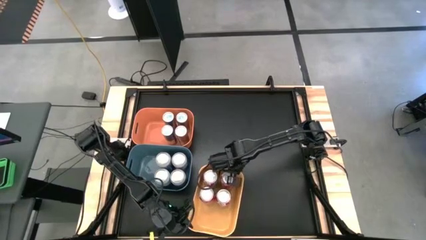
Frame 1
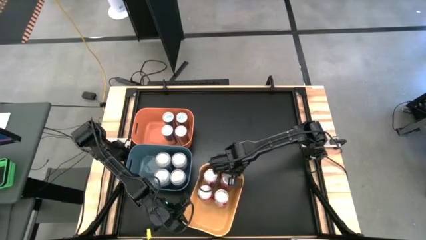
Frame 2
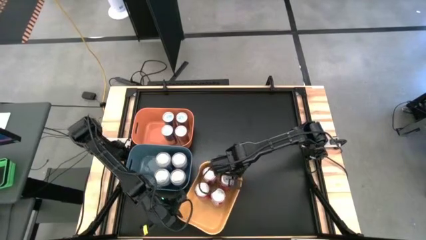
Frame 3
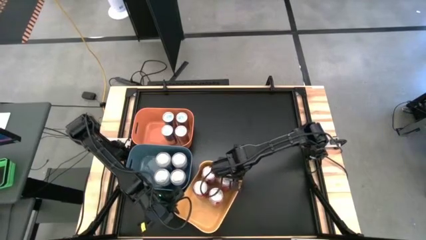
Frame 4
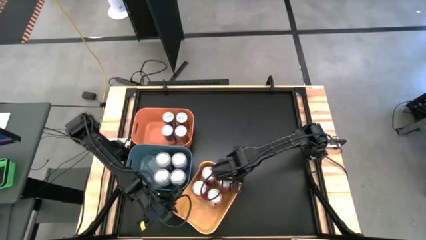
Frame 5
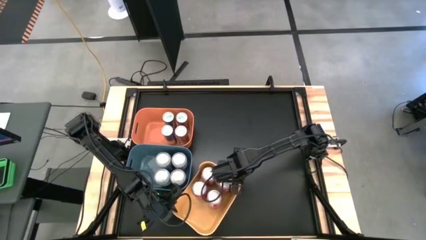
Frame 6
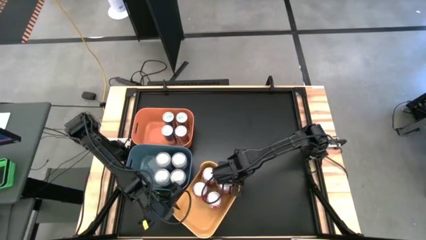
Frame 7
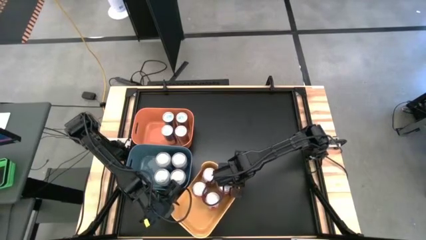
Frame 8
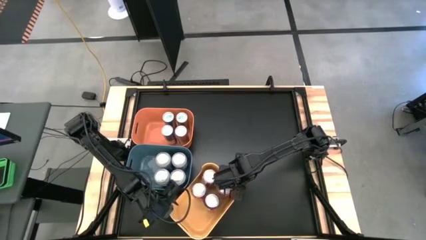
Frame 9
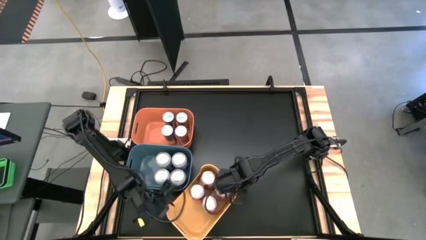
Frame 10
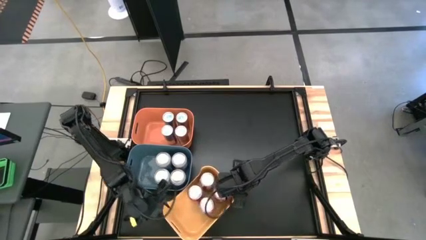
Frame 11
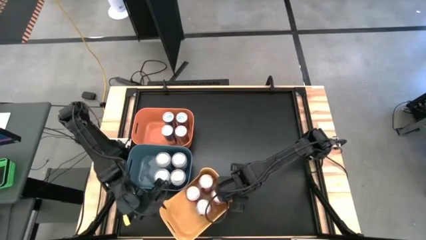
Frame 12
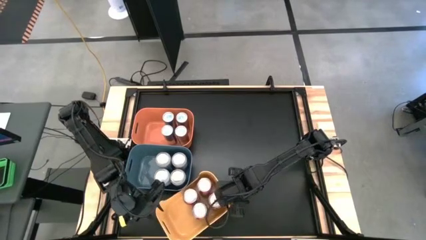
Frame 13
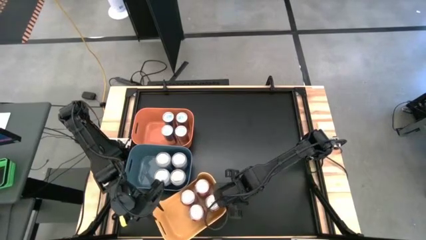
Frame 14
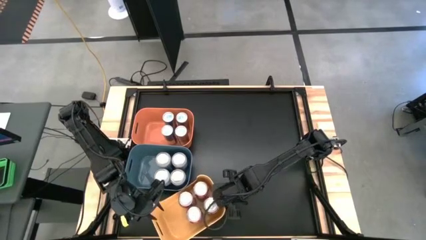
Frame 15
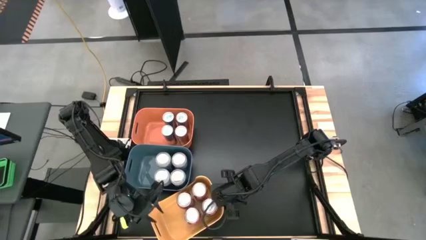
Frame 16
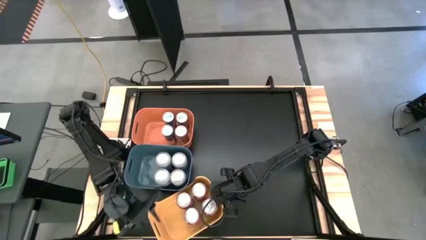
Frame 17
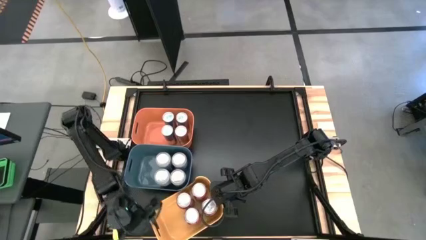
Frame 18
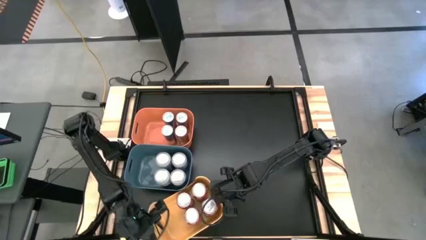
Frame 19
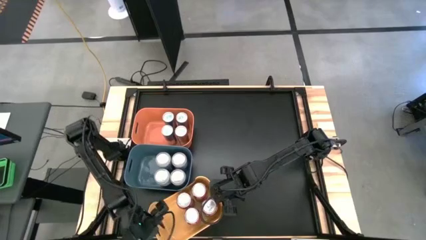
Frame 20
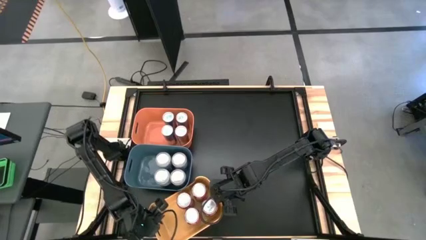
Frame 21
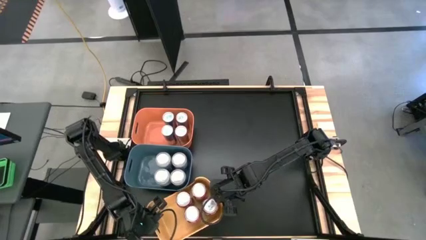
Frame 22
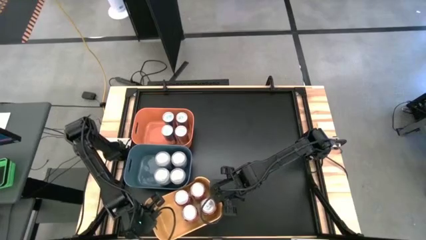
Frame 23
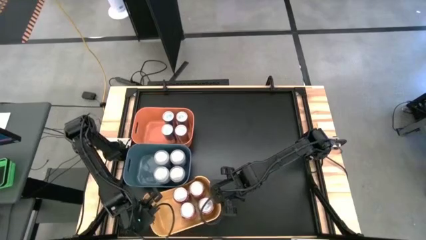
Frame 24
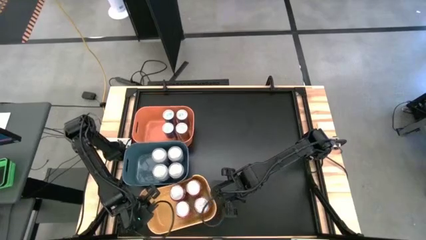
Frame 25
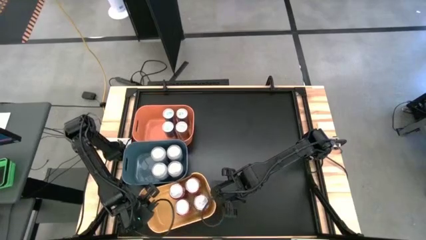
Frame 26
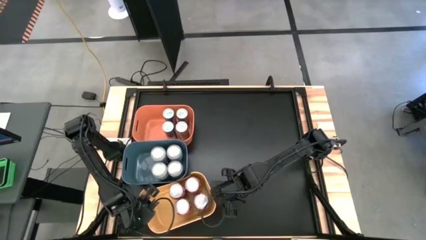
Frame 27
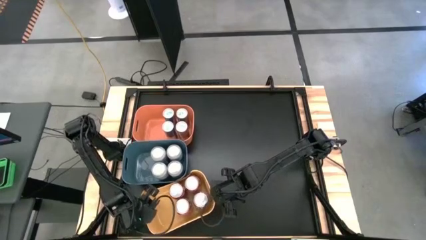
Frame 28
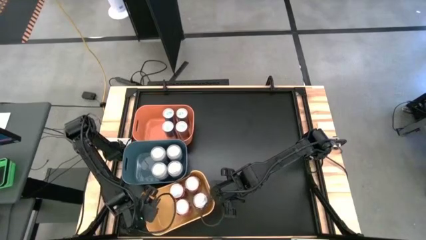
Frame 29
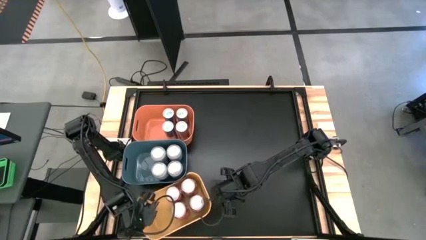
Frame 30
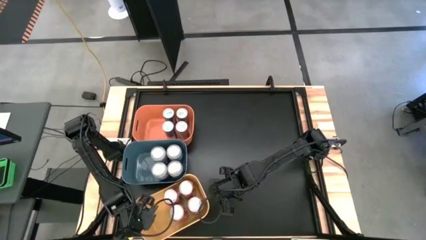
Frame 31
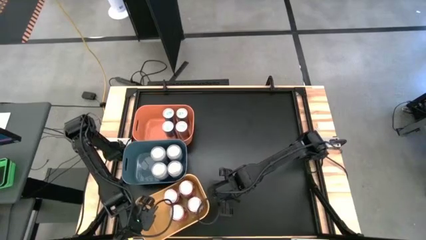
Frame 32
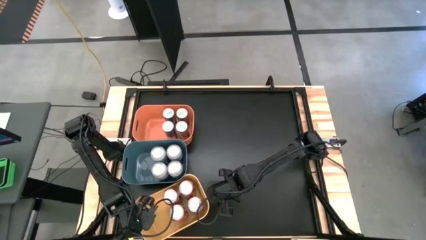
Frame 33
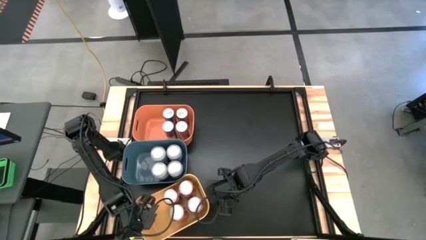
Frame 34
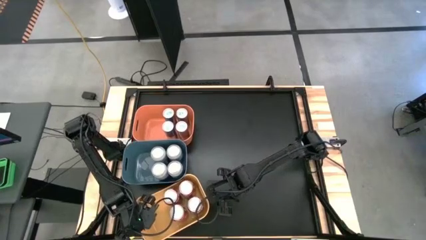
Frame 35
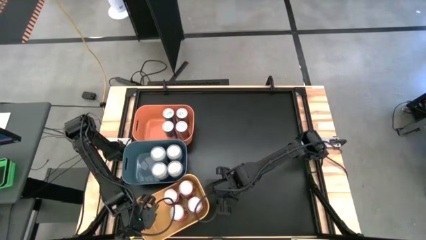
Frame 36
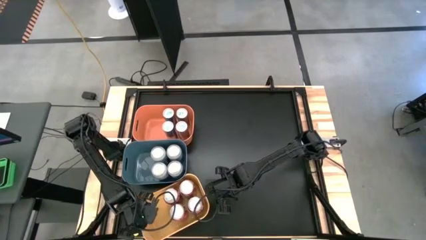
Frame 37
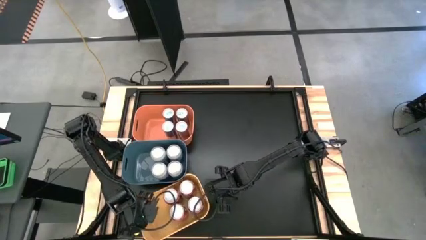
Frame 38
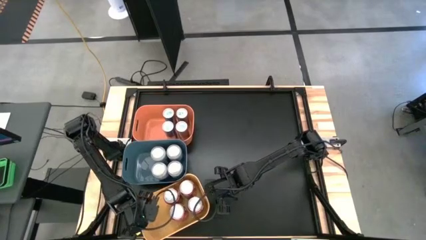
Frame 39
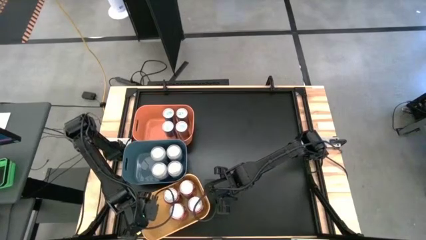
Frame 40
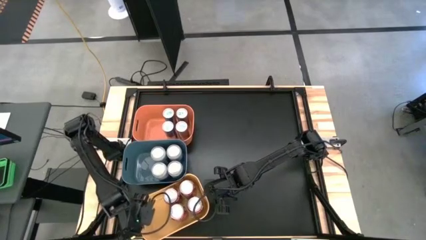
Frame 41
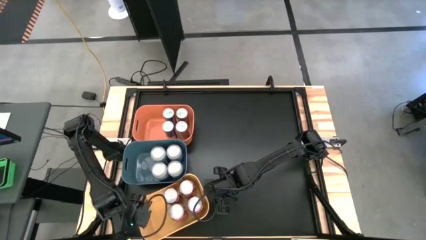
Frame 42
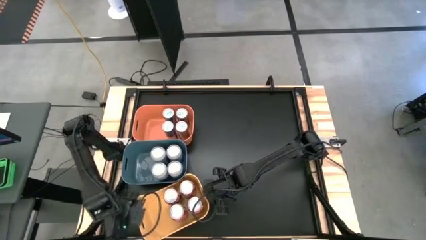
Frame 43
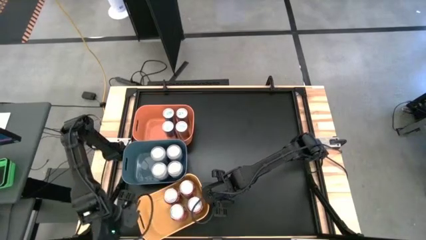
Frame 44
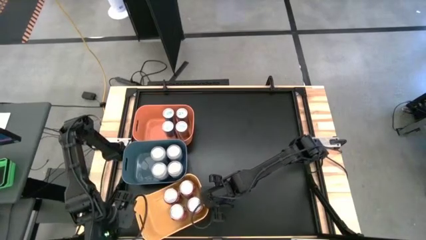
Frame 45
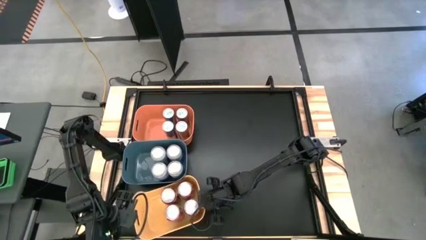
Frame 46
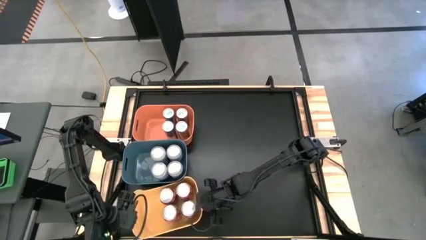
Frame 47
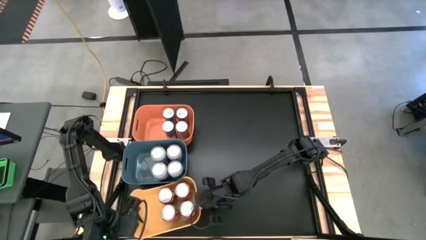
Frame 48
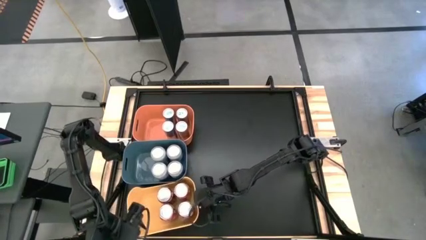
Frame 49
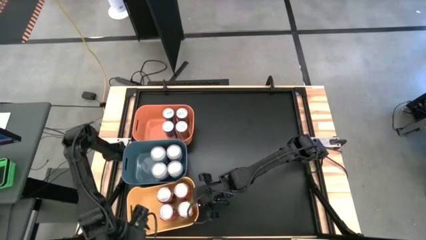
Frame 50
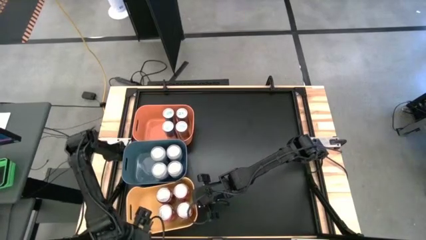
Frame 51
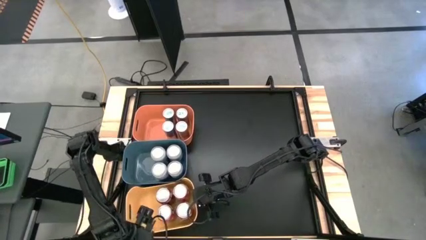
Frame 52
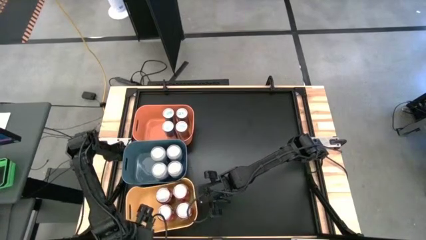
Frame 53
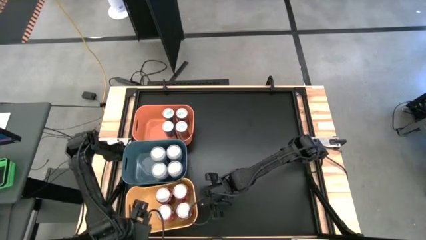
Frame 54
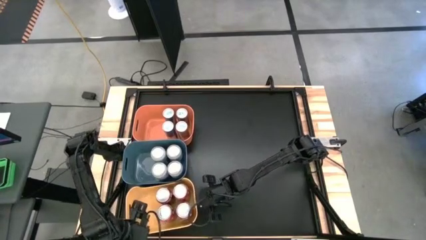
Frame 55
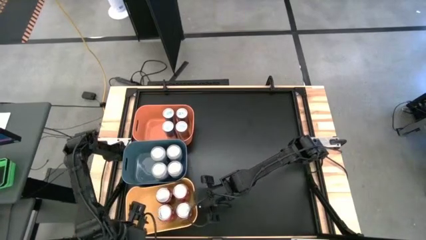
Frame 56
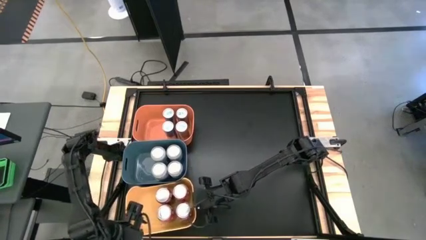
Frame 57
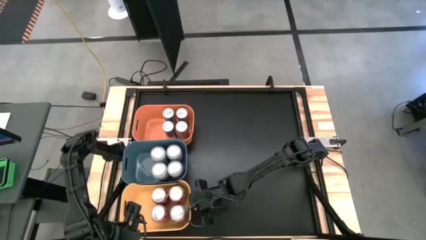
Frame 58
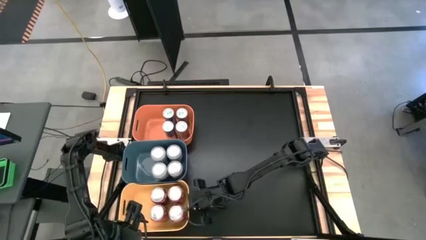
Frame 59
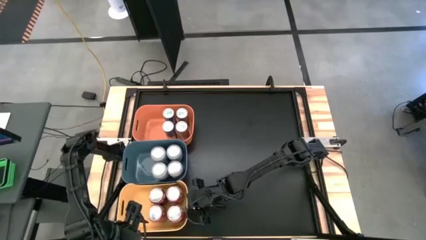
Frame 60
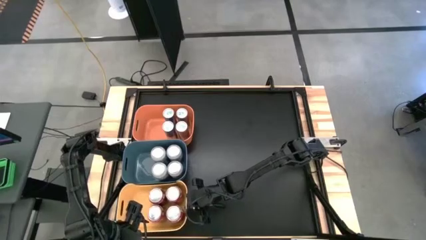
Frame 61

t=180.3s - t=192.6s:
Task: Sort soda cans
Move the yellow bin to the bottom left of the table

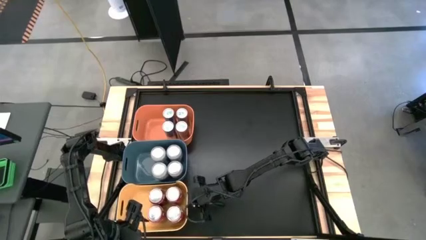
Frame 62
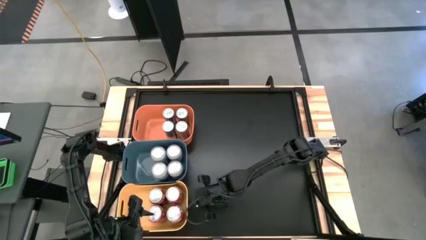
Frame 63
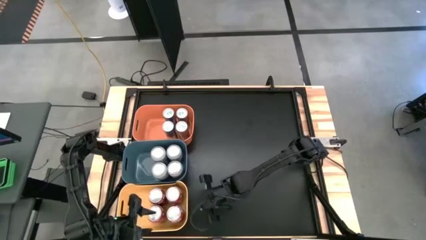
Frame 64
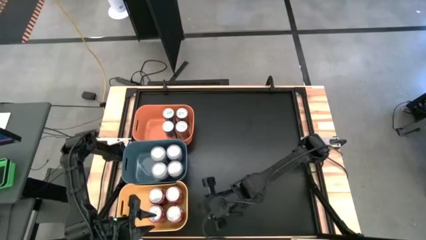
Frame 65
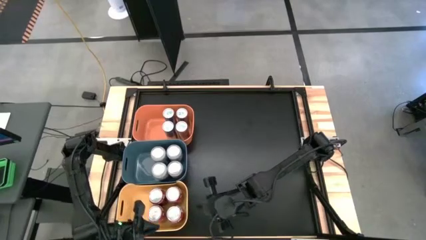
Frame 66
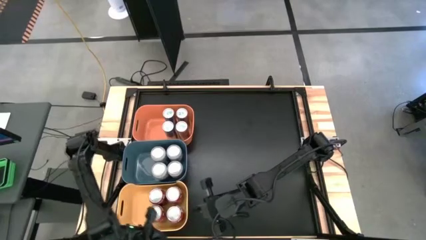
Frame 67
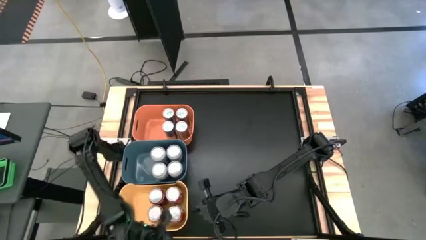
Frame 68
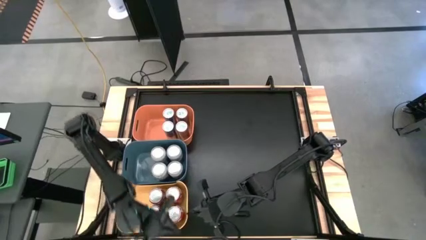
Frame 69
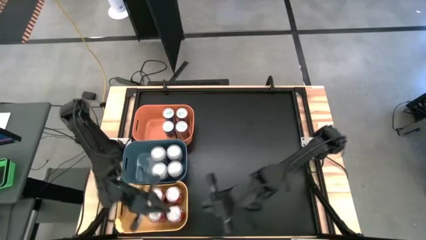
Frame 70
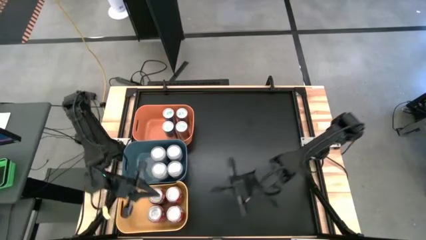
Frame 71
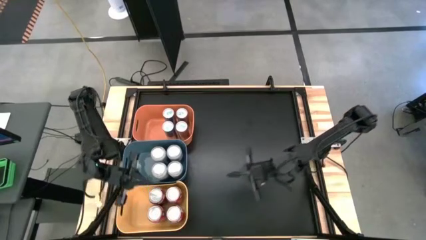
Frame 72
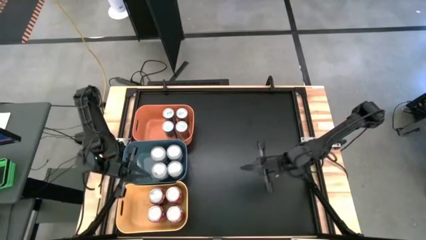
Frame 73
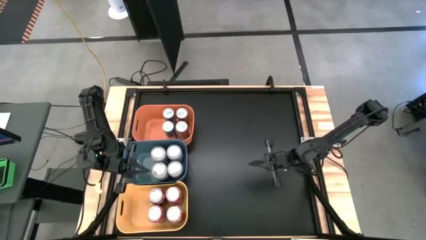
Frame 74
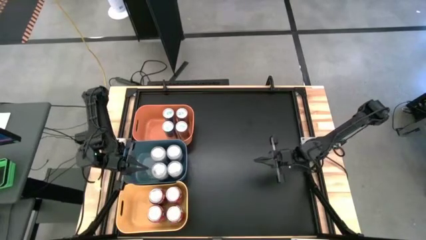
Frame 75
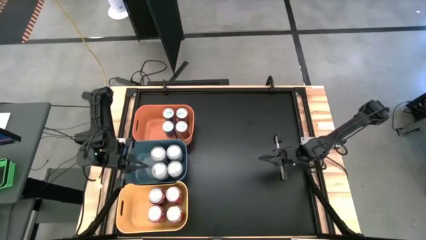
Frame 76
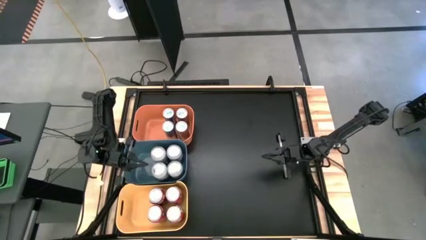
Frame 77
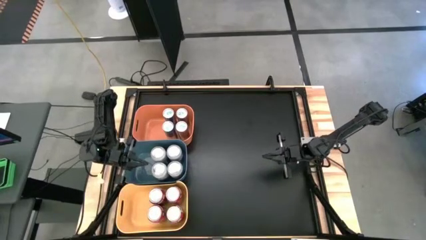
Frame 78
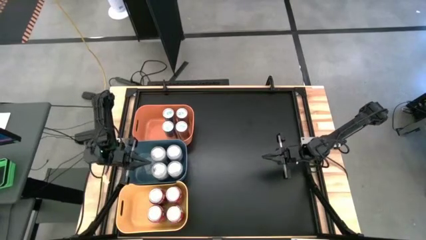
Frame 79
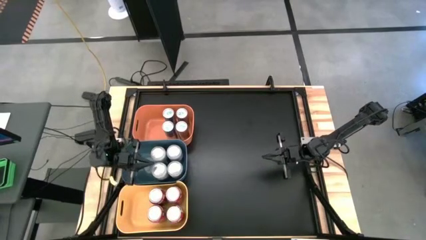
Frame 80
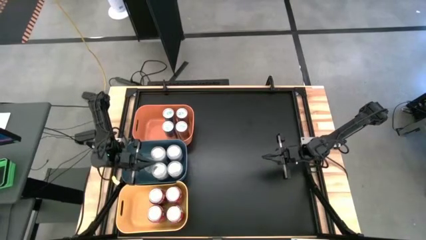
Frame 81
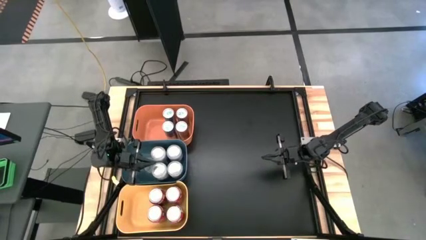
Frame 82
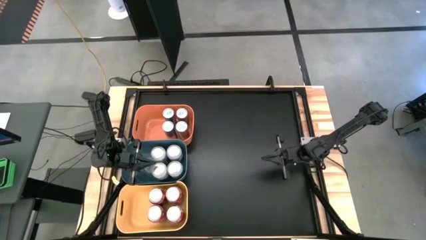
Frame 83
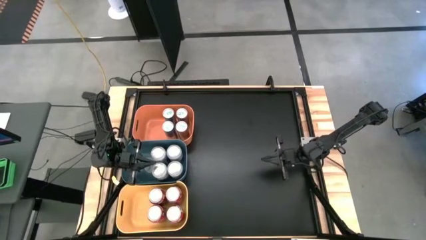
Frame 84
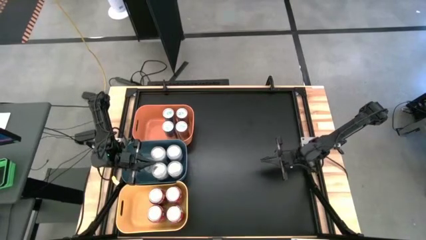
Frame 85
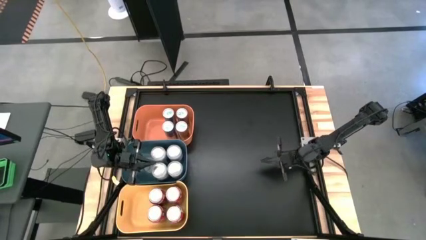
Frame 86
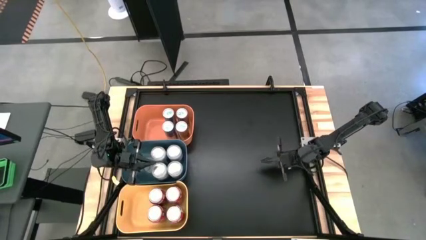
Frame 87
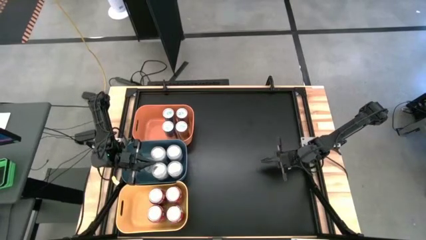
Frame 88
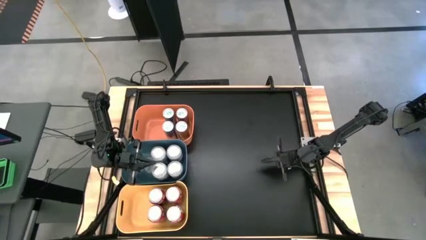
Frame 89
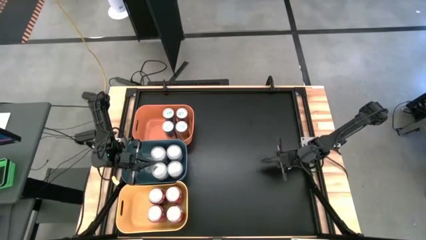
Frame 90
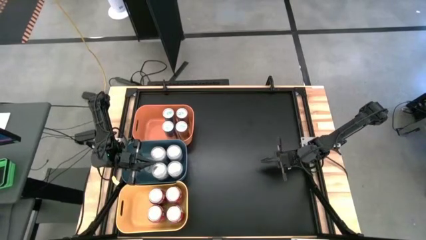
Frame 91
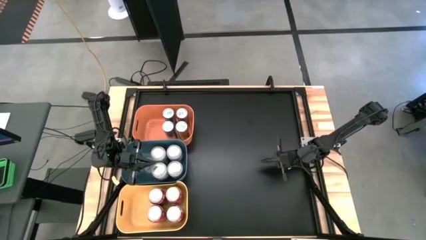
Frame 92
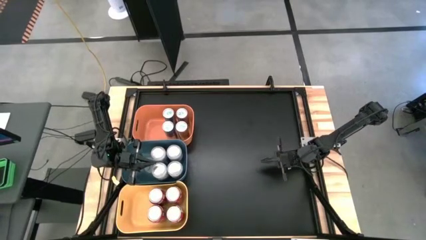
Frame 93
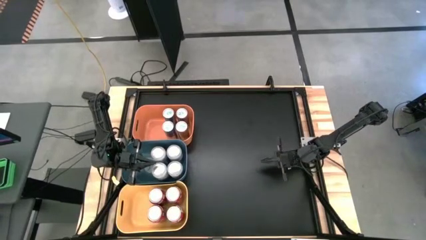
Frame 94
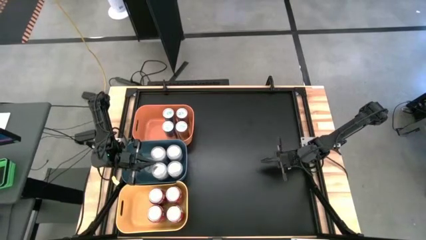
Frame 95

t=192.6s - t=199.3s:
Return to Home Position
